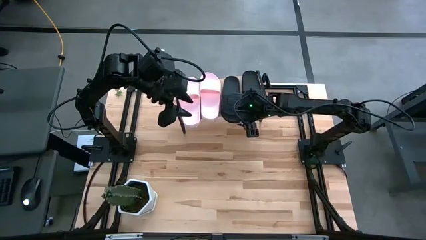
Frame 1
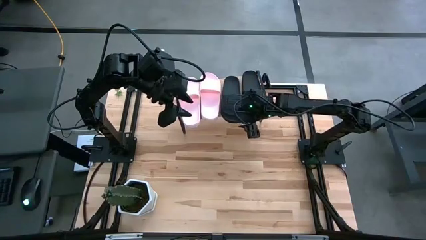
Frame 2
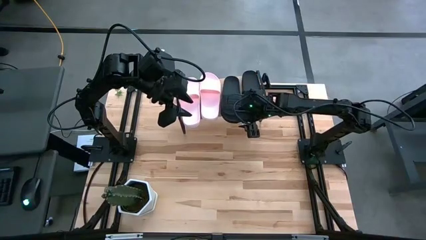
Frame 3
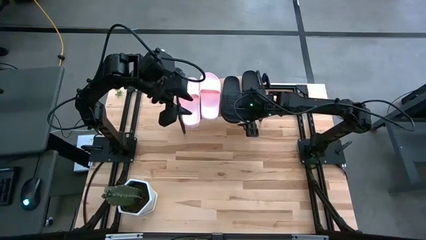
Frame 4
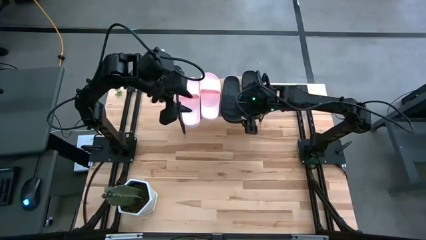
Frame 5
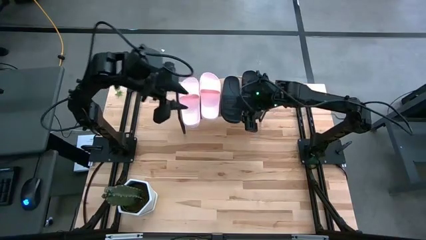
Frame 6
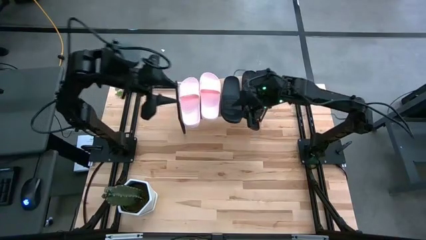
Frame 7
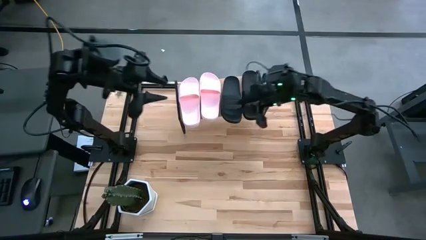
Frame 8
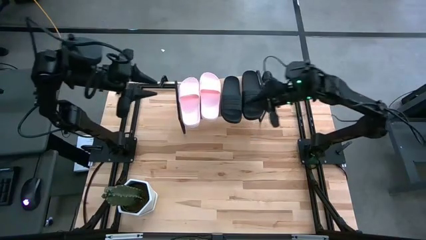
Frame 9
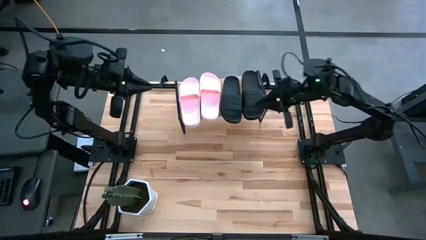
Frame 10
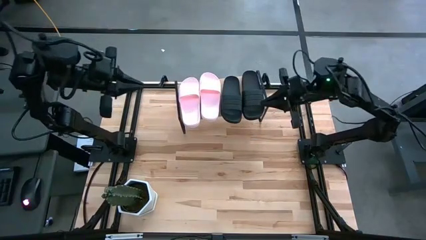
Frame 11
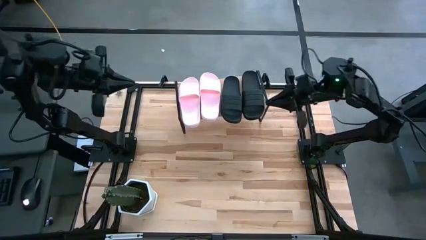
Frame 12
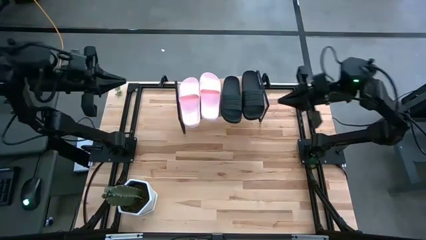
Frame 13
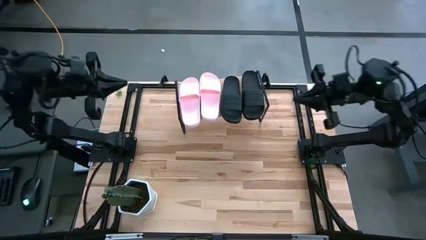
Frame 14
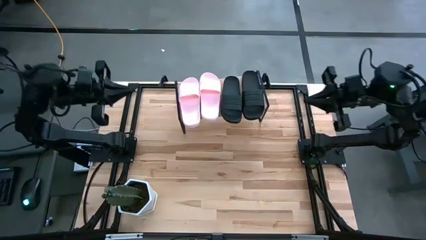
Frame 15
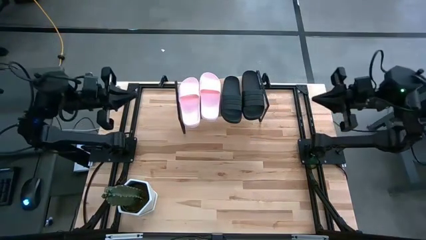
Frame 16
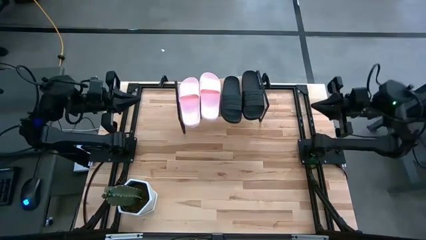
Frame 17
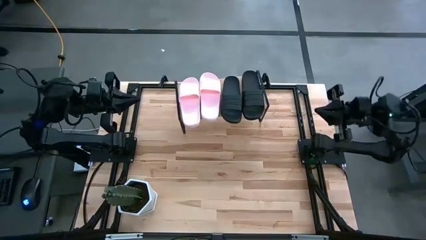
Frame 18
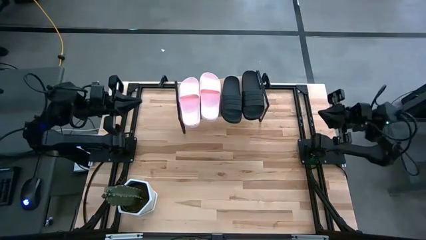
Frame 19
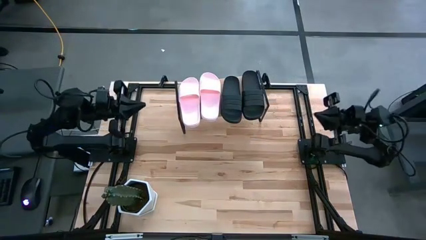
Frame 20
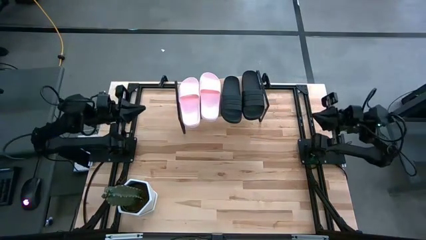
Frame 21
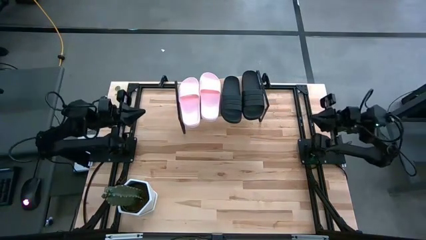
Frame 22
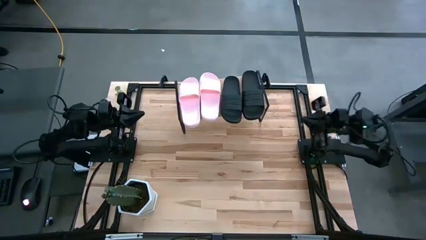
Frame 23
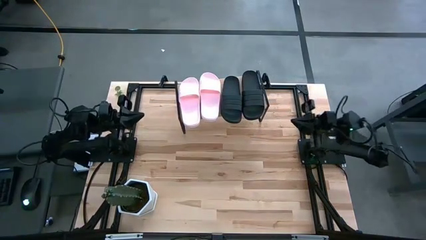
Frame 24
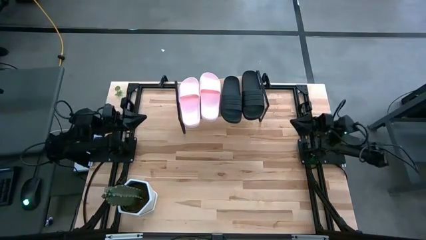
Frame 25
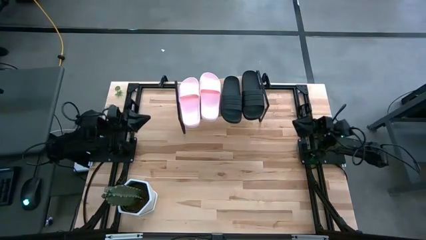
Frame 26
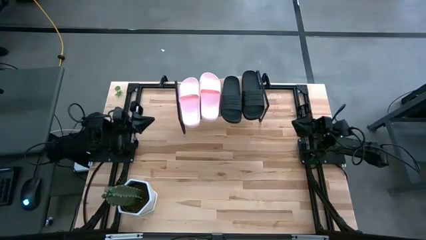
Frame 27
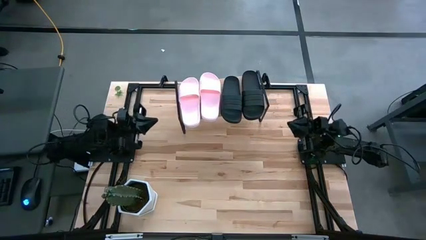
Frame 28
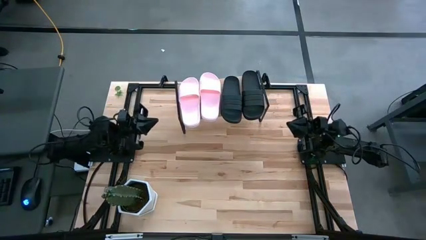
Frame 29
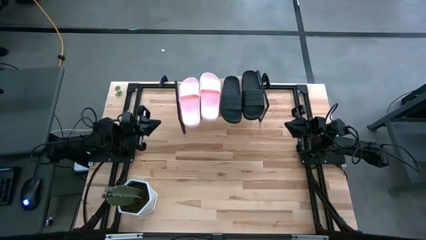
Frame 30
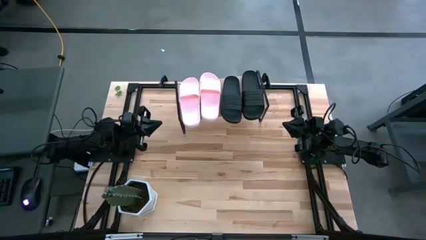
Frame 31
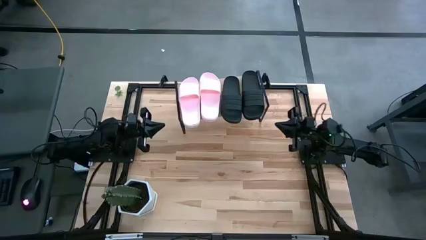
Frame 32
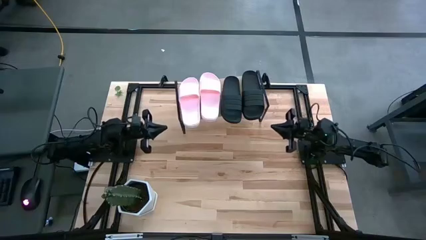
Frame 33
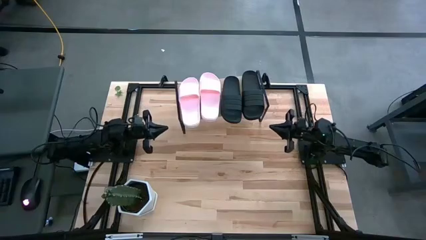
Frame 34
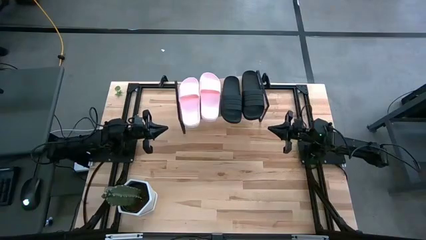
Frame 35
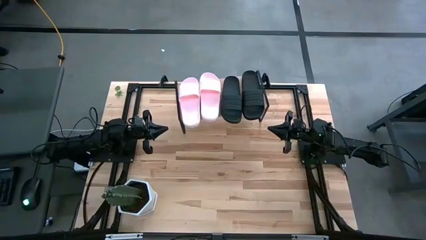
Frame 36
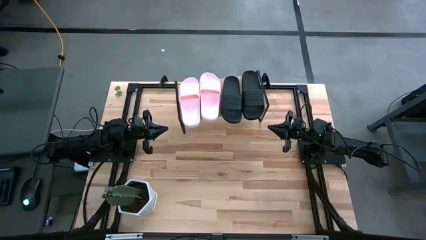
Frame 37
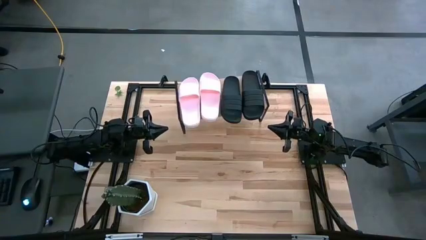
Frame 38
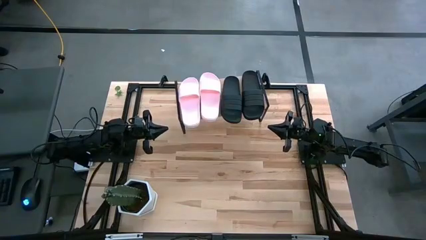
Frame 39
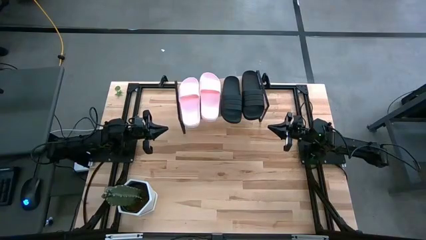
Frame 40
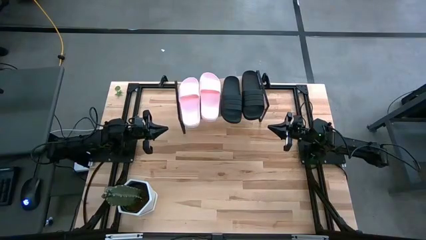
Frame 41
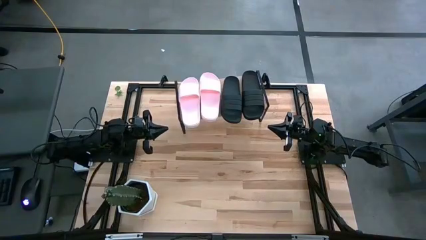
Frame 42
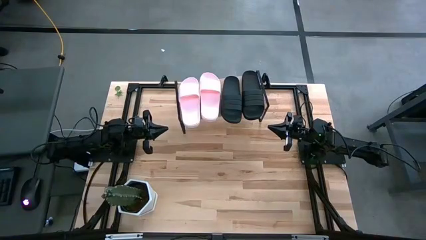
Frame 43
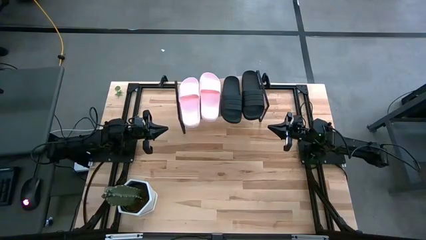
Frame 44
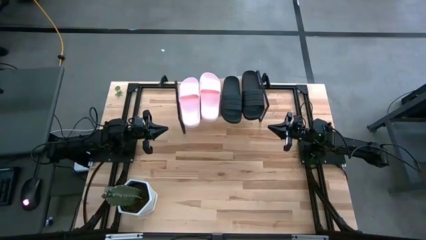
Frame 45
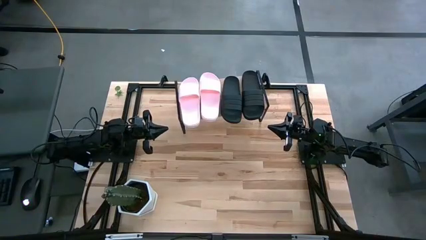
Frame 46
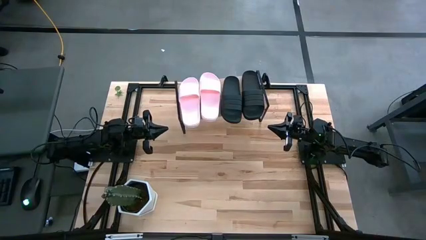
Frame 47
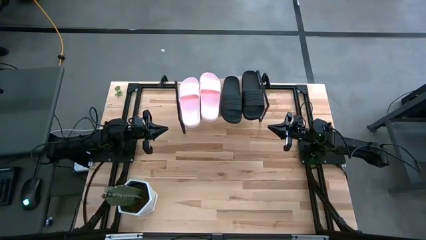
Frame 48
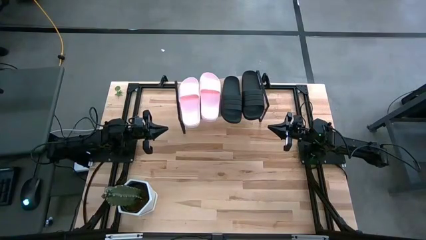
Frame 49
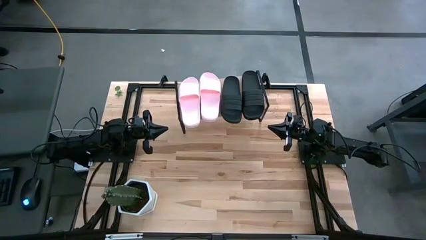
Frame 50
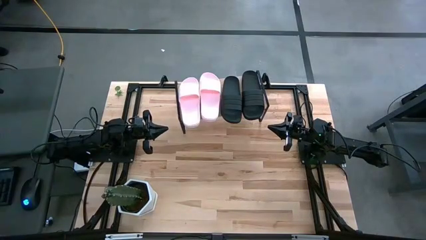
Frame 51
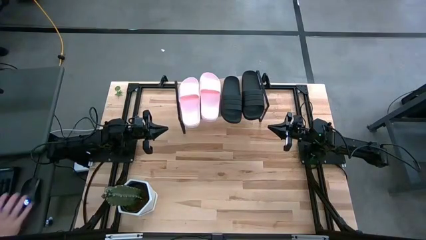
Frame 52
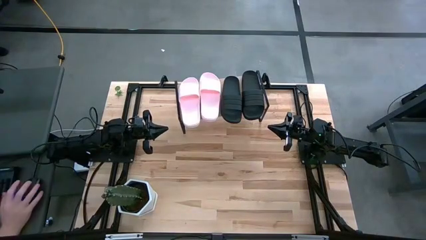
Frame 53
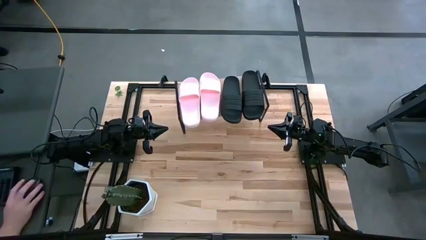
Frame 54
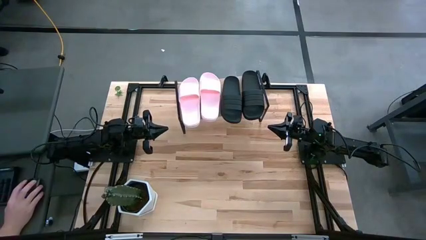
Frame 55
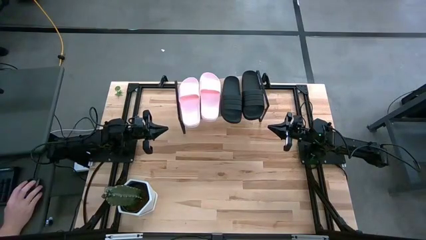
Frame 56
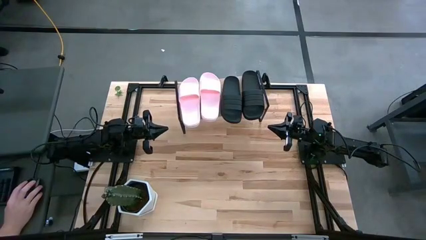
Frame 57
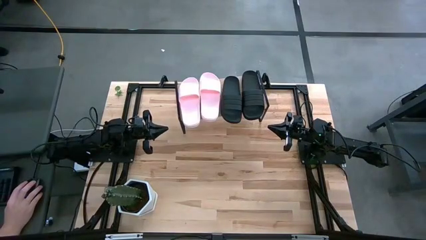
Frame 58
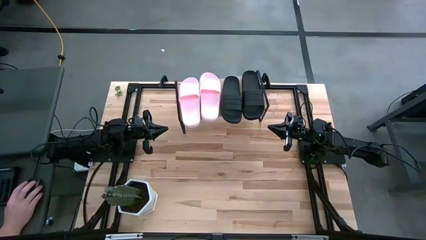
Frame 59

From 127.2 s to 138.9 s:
Task: Pick and place slides into the shelf
Return to Home Position

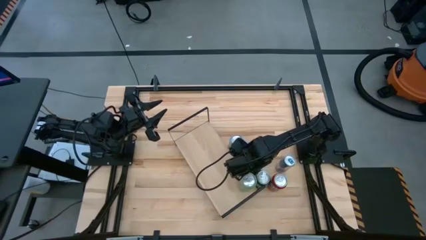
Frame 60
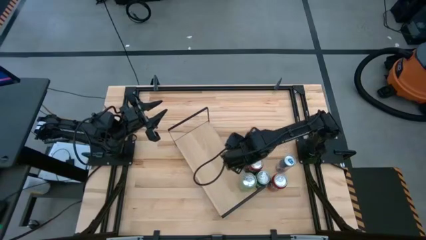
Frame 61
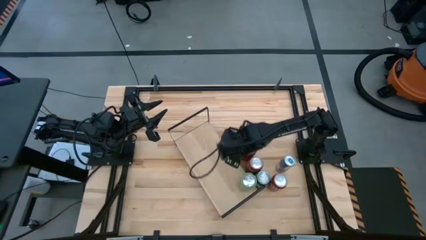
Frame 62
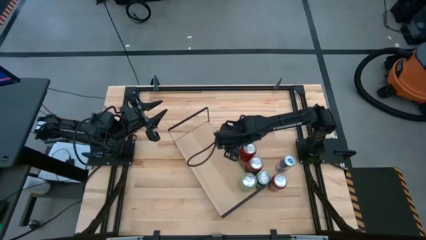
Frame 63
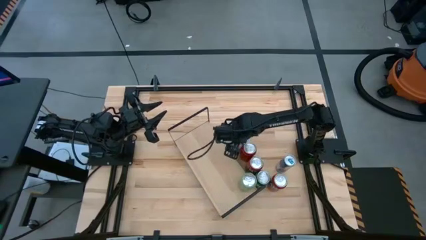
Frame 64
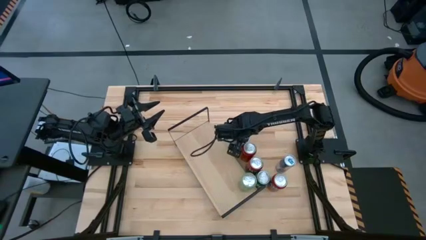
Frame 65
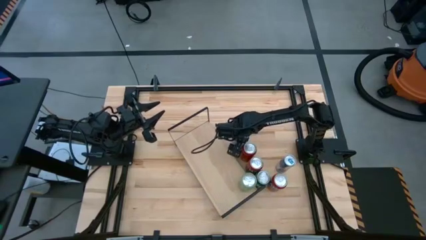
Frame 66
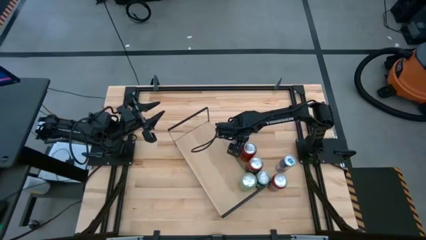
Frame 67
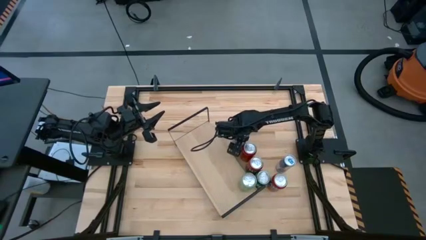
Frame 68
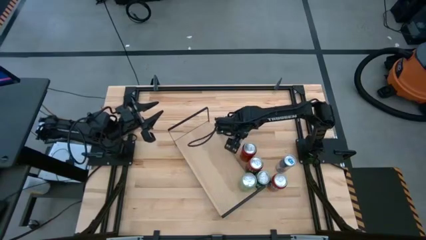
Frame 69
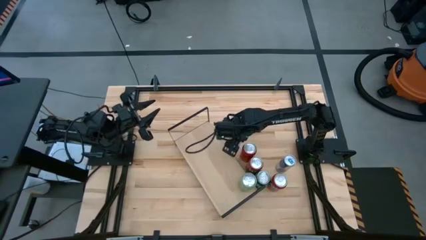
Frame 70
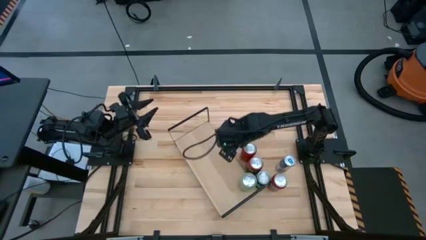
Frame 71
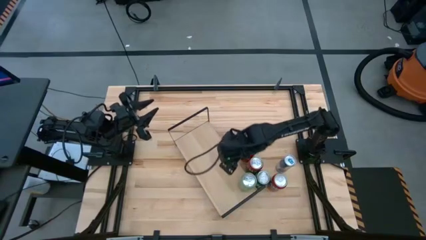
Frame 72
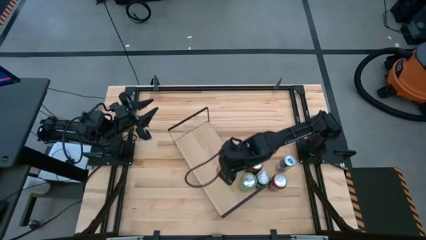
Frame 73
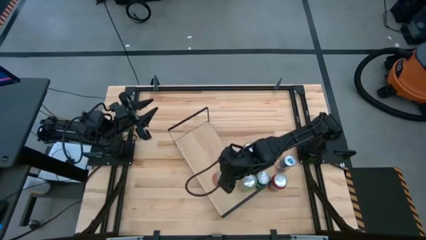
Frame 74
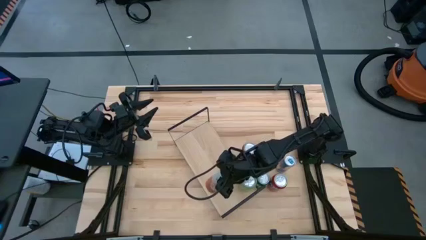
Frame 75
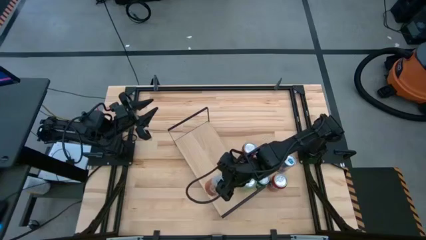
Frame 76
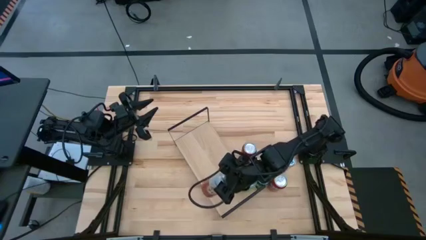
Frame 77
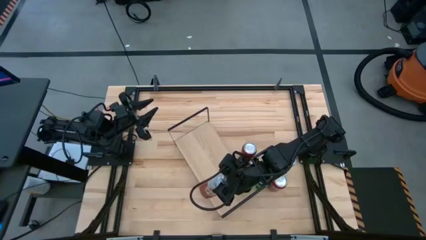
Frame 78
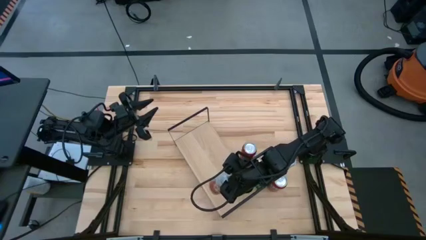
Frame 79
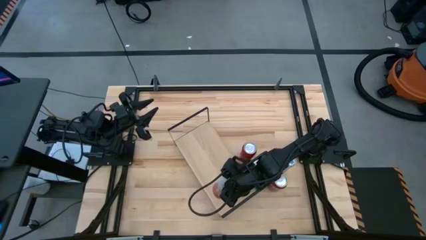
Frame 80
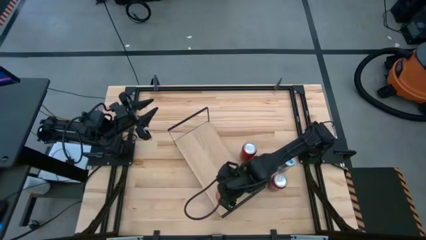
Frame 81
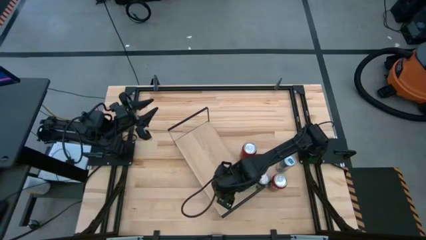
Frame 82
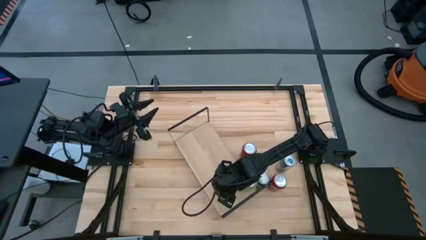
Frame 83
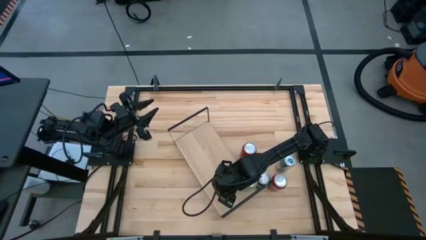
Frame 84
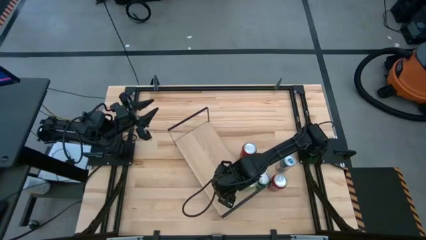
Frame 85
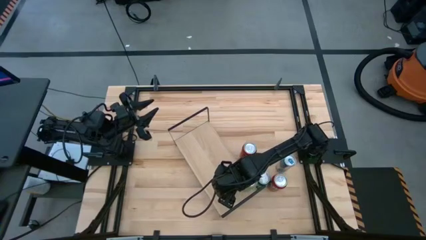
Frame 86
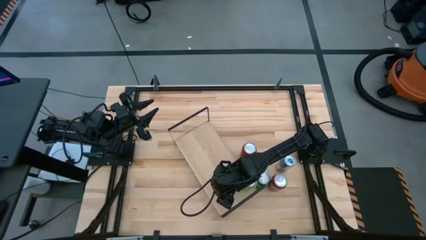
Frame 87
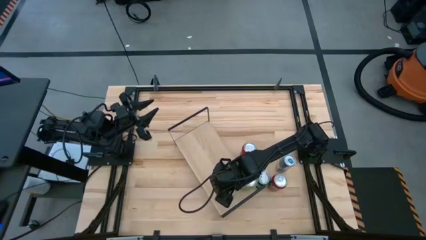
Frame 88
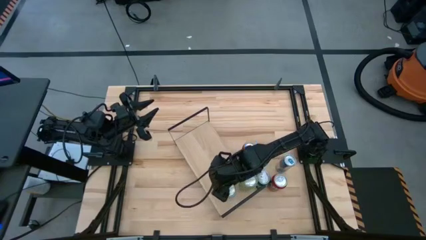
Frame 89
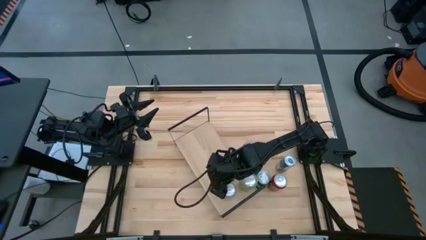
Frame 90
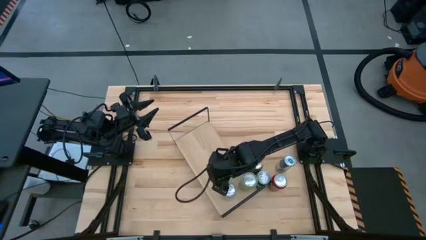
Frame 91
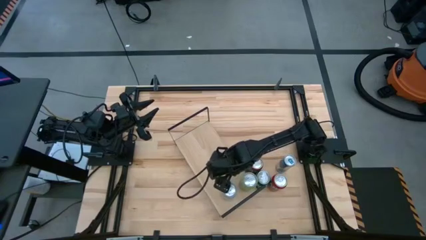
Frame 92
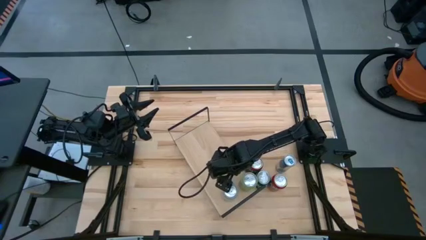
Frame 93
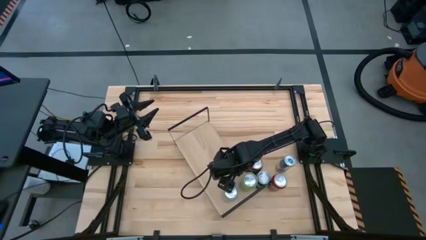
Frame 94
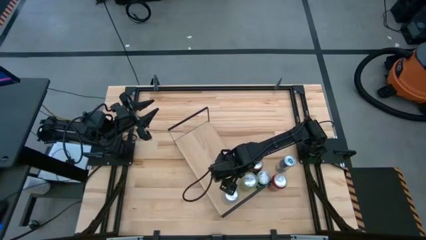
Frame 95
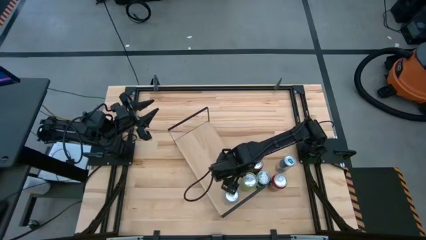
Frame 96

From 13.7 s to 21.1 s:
Task: Place canned beverage on shelf
Put the white-pink soda can on the shelf
